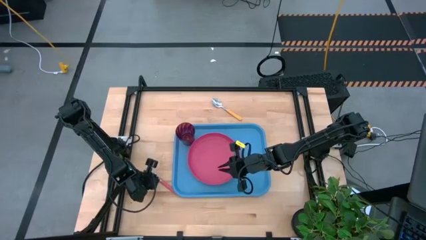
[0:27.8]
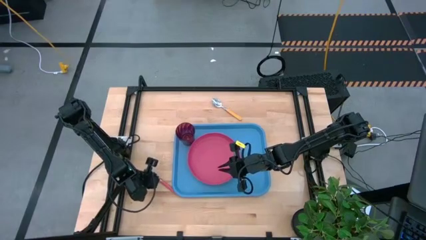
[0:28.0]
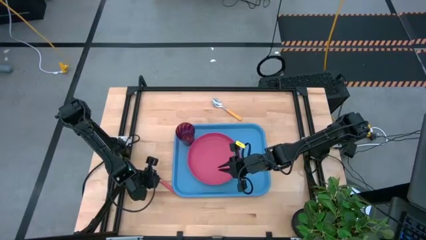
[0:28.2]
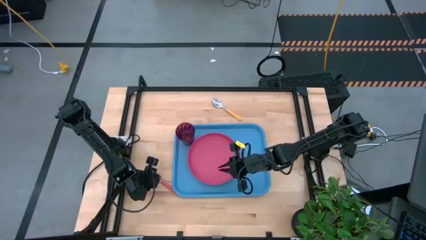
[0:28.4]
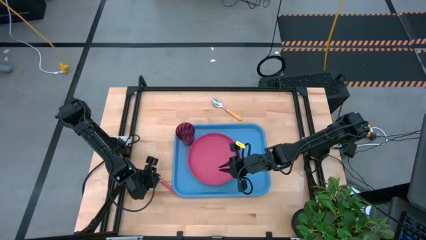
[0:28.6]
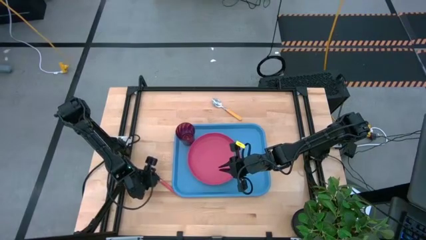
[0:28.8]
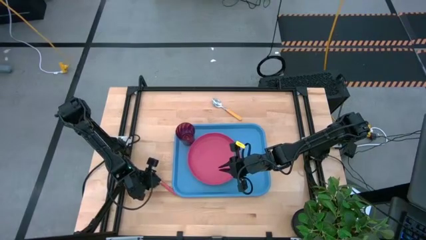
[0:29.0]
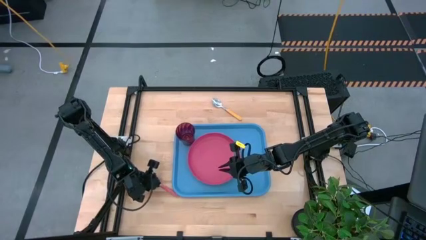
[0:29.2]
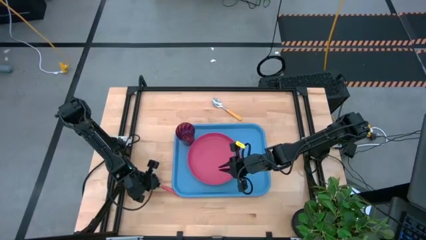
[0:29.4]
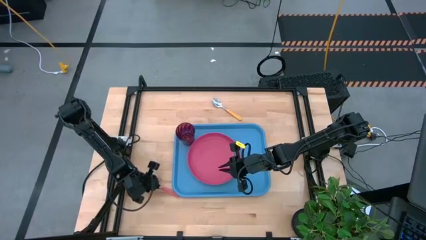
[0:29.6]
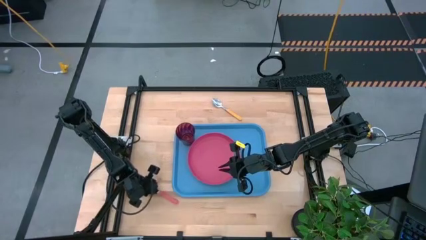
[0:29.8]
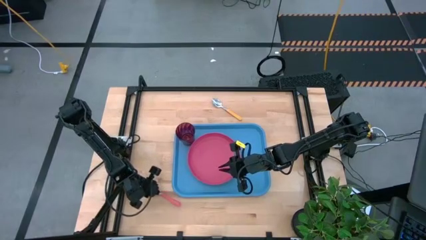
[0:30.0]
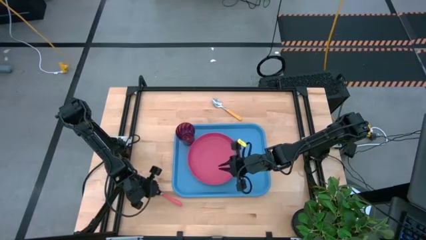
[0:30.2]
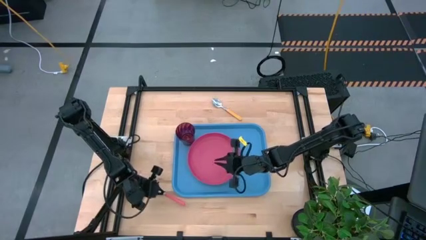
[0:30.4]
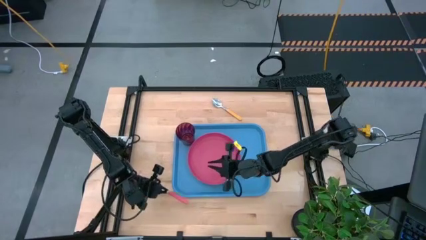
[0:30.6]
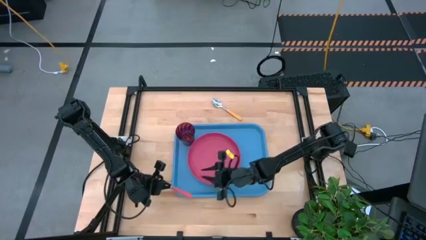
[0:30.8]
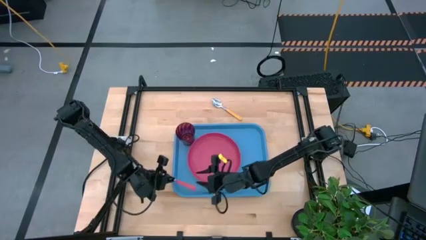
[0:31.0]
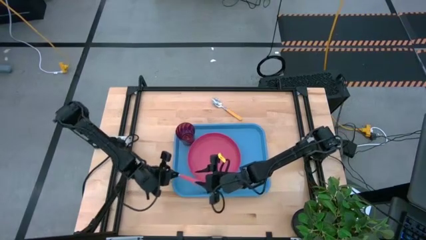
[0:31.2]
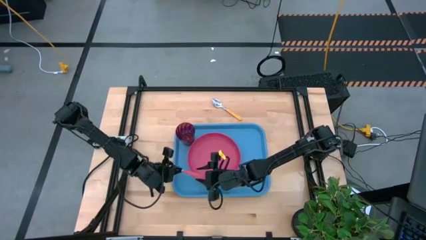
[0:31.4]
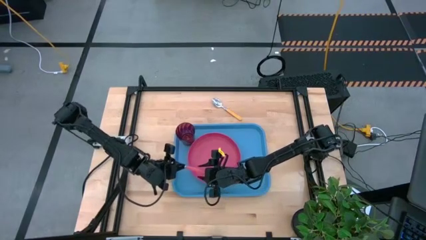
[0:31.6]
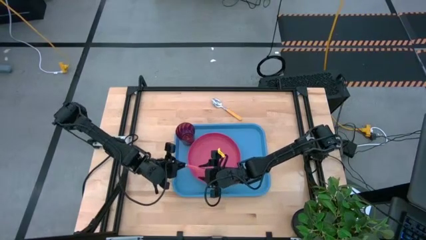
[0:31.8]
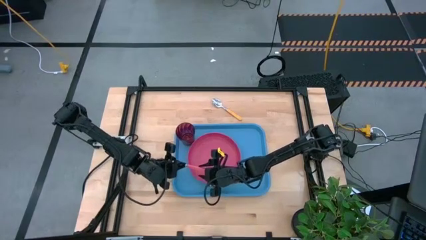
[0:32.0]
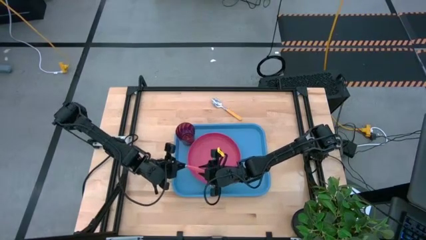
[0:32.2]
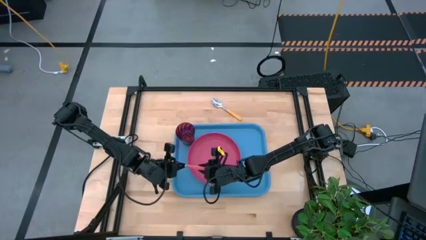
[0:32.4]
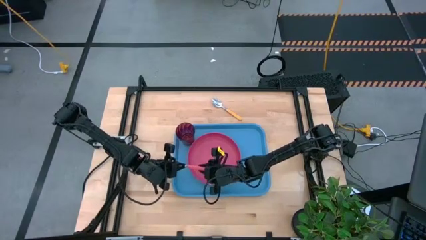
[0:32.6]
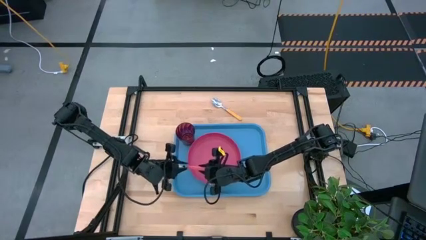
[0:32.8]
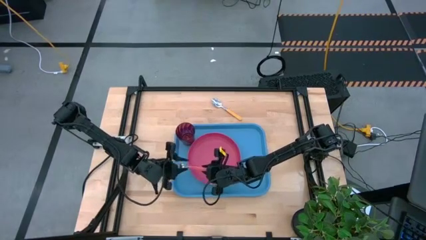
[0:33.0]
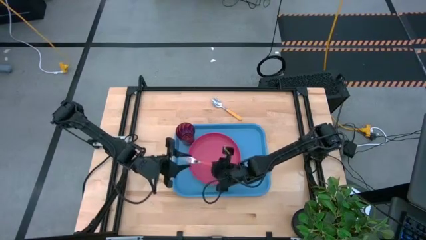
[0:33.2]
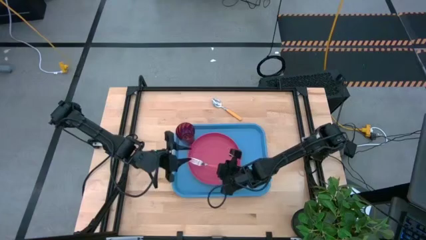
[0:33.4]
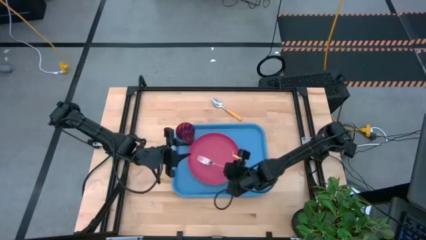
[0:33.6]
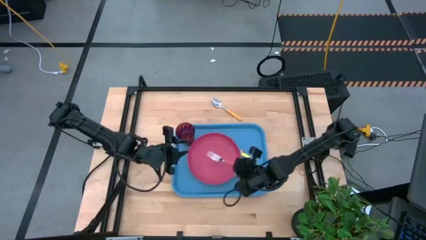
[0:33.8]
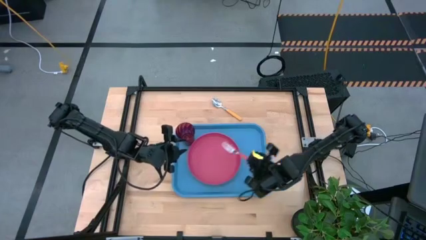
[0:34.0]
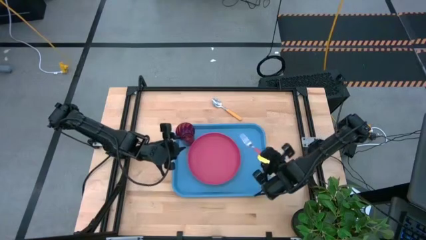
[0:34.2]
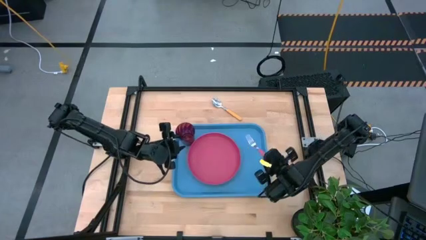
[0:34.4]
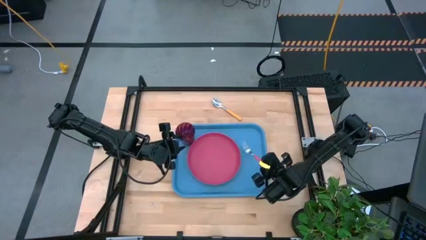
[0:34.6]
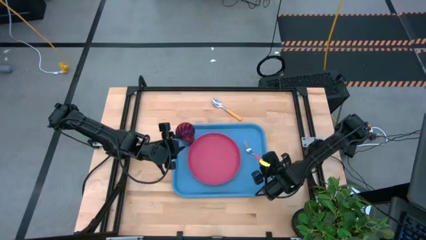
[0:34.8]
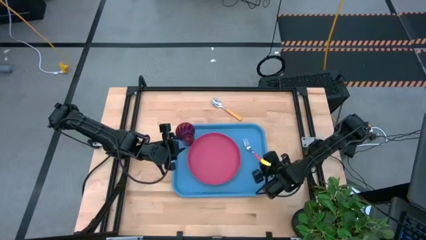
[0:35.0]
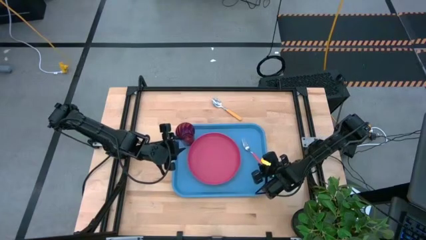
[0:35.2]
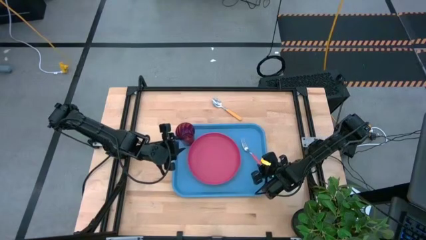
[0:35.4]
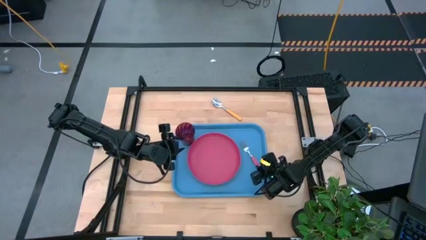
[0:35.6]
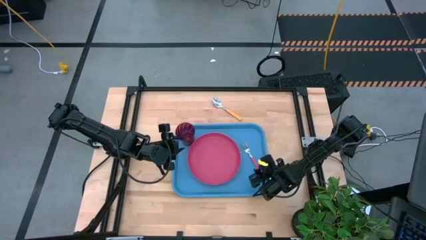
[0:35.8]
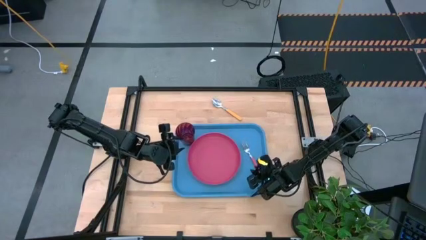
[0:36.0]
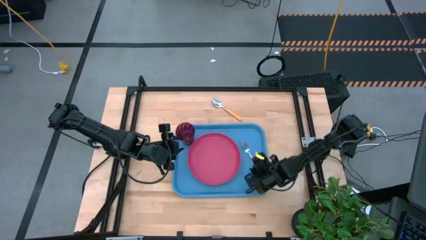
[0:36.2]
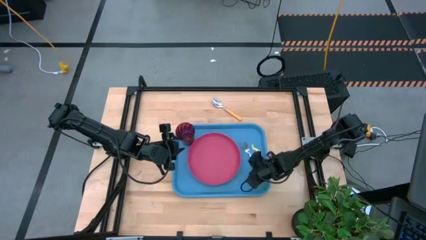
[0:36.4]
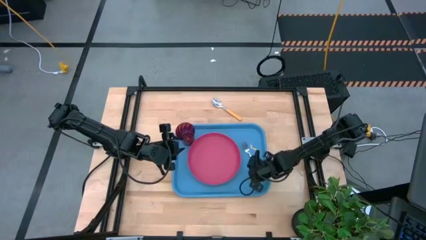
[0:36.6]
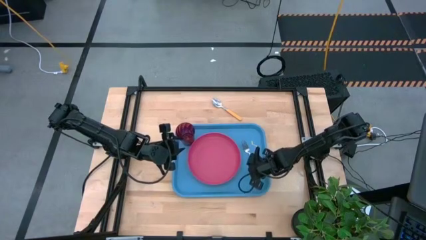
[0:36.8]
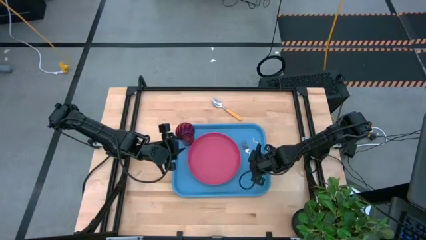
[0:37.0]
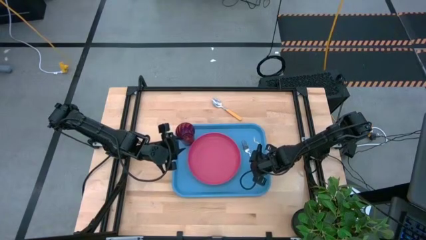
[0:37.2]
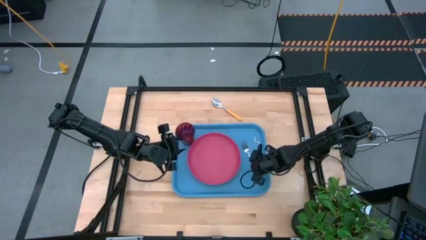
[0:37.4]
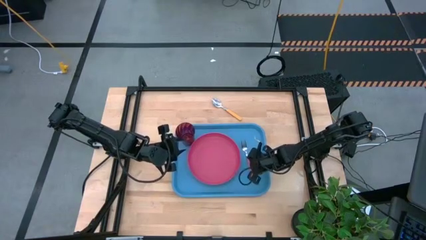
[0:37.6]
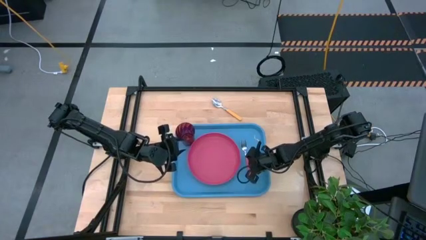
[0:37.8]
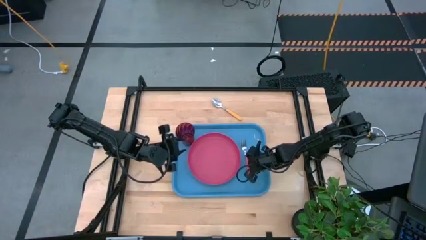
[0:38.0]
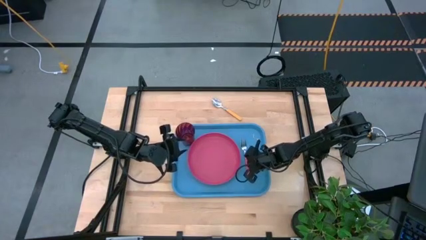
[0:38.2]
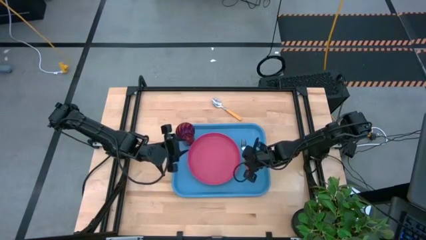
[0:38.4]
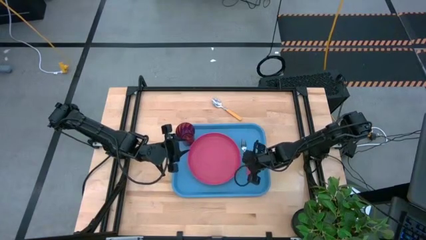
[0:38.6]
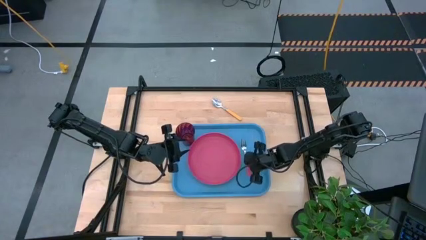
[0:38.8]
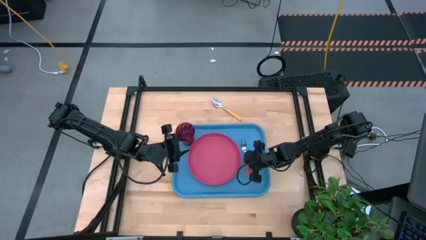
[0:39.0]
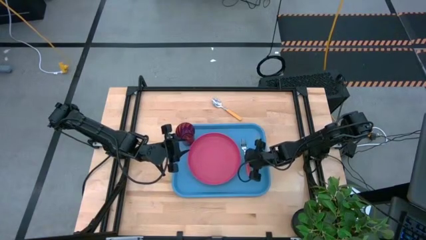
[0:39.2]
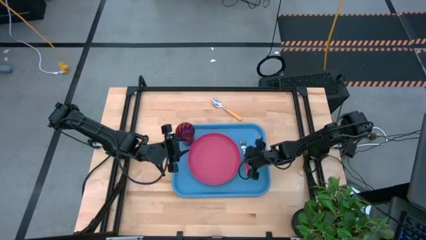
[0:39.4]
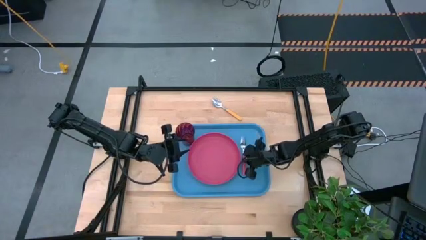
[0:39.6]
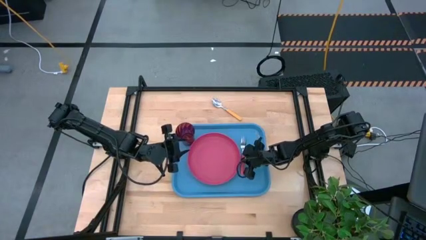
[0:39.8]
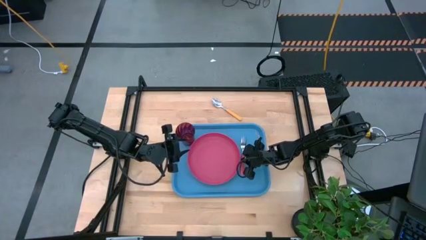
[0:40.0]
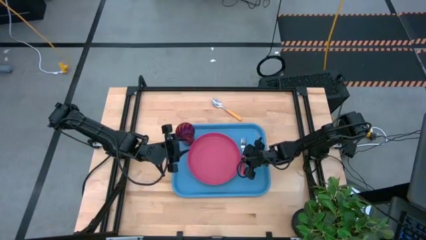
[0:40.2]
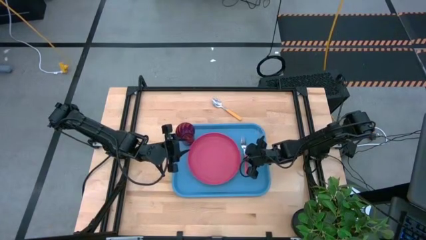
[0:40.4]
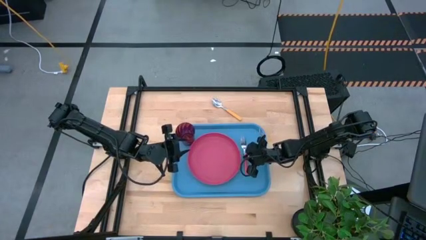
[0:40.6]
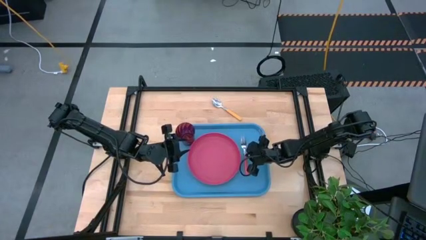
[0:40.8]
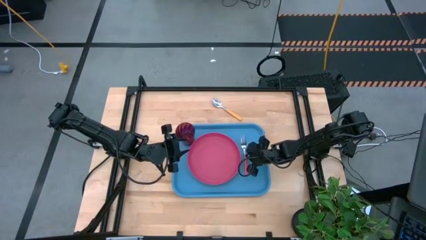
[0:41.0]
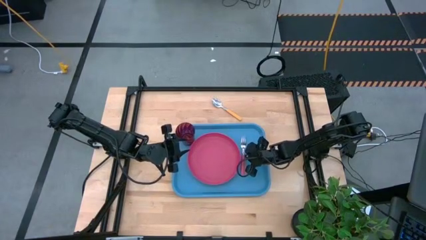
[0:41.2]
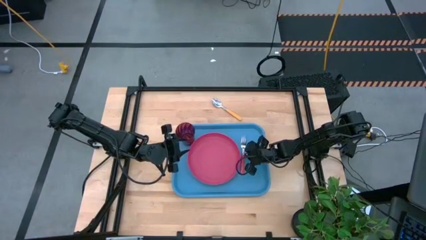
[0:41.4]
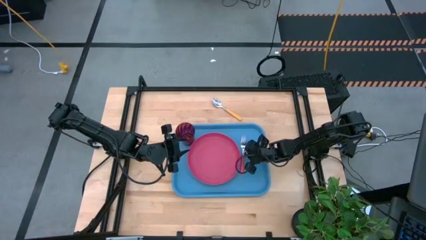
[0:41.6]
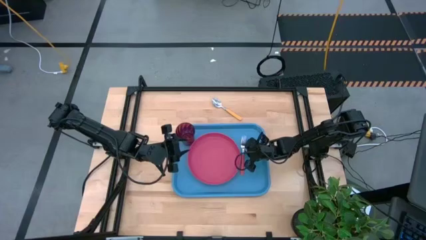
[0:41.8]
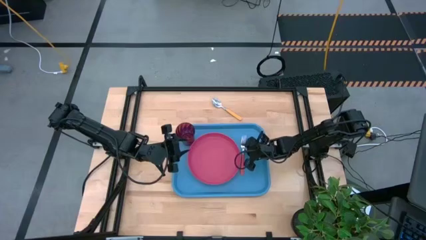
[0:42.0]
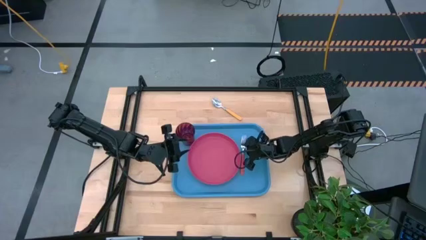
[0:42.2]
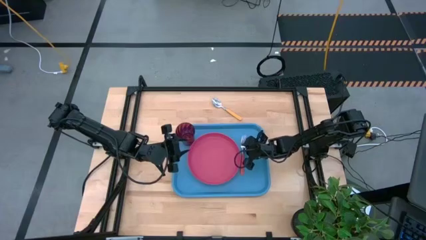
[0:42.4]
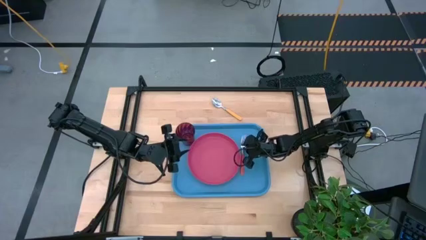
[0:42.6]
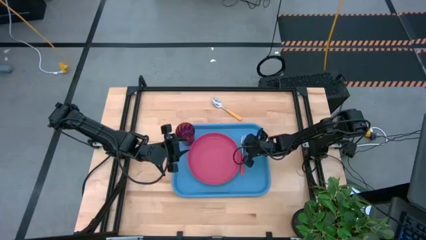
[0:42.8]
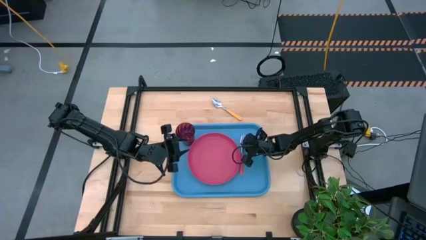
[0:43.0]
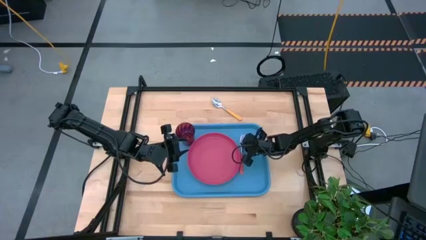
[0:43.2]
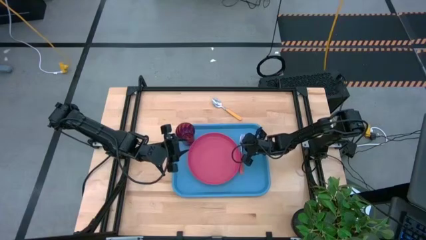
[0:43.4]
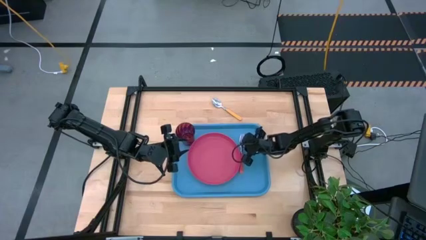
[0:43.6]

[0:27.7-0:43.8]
Task: Pick and place plate/cup/fork/spoon on tray
Put the pink fork on the blue tray to the right of the pink plate
